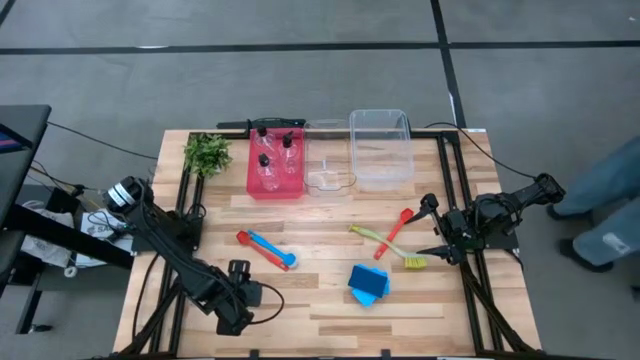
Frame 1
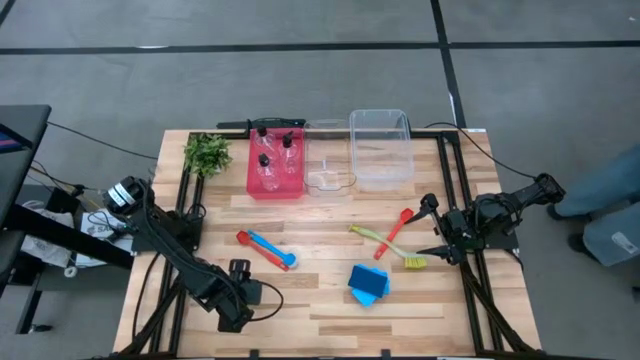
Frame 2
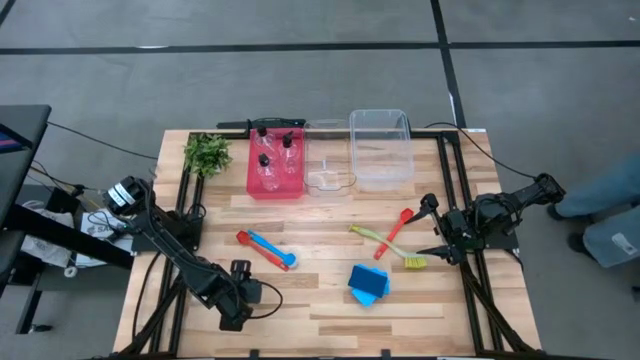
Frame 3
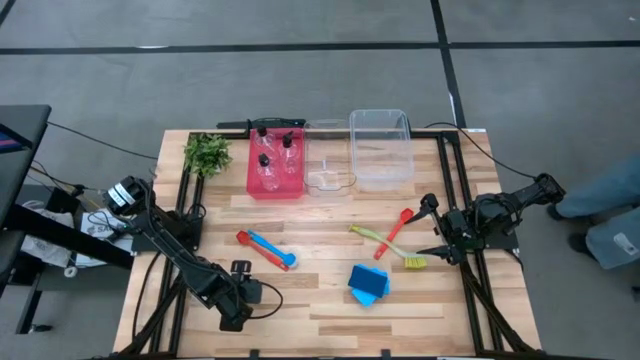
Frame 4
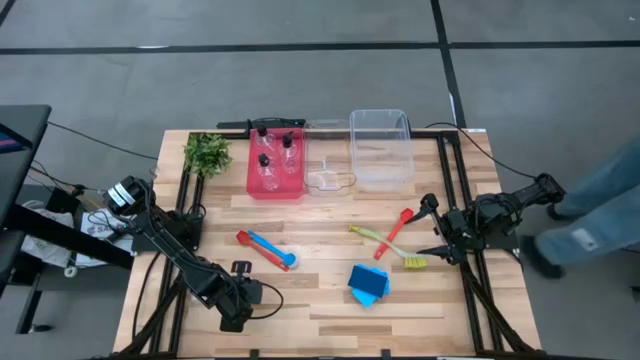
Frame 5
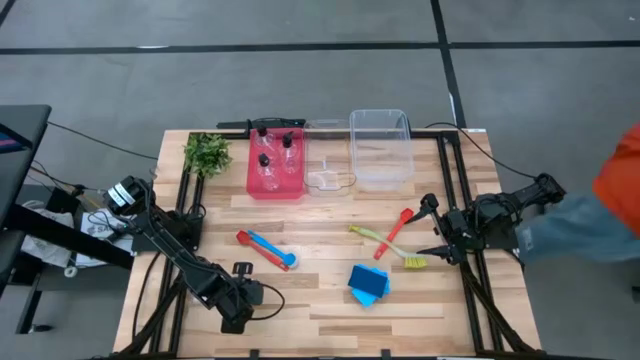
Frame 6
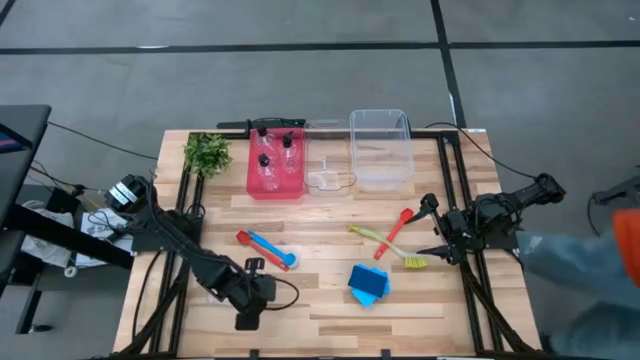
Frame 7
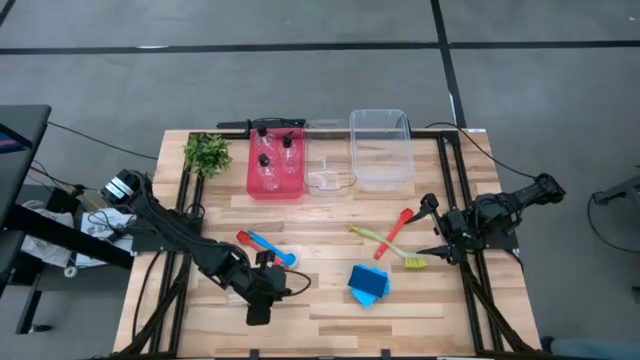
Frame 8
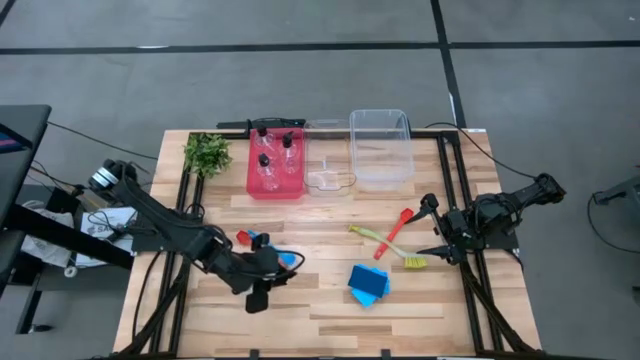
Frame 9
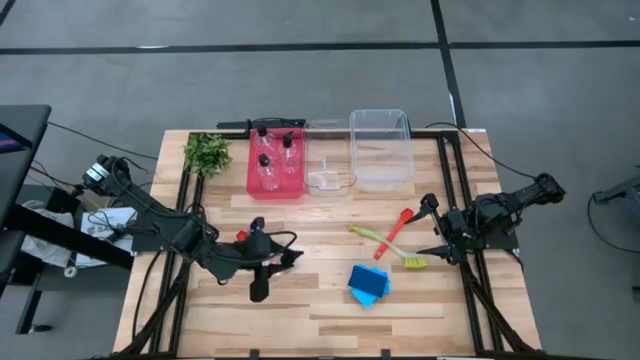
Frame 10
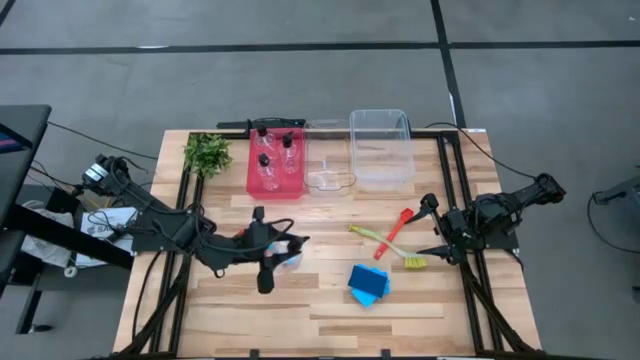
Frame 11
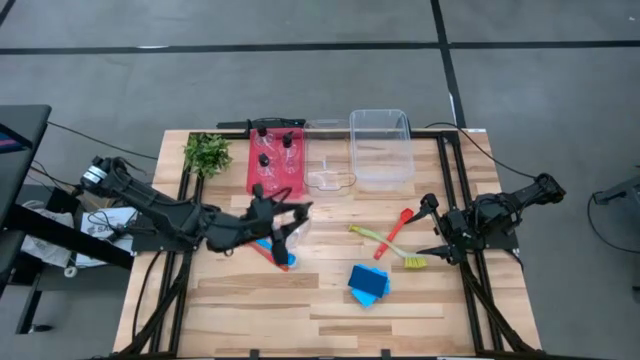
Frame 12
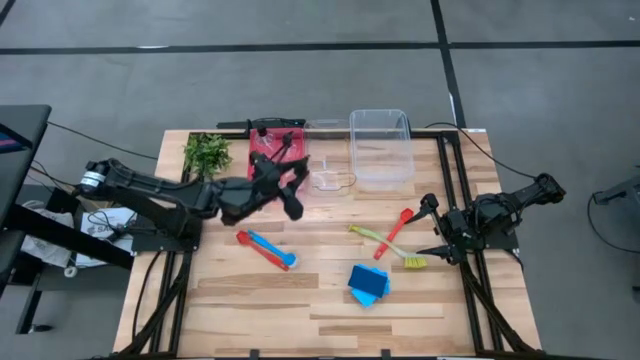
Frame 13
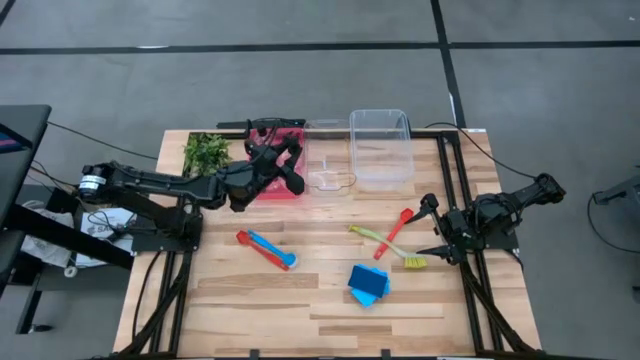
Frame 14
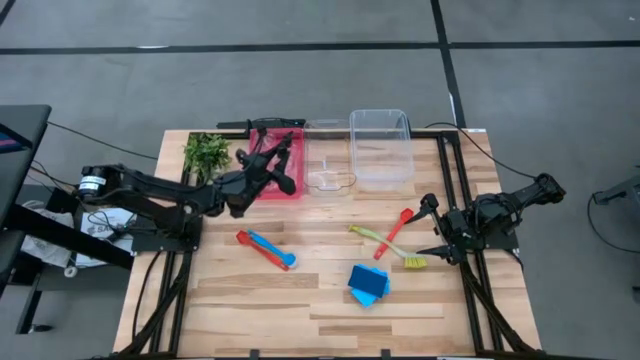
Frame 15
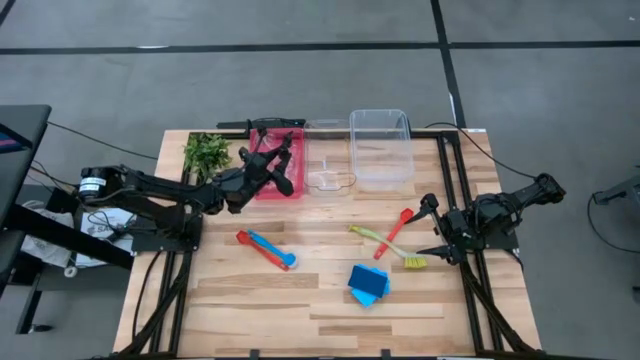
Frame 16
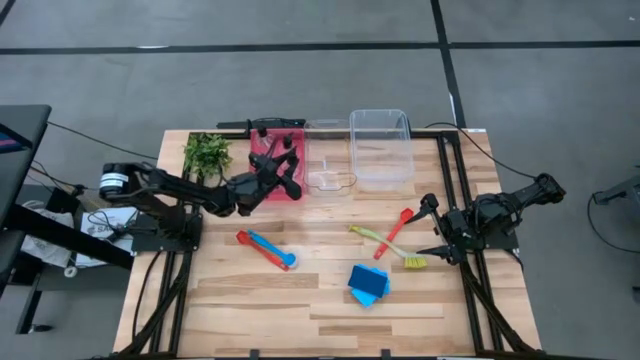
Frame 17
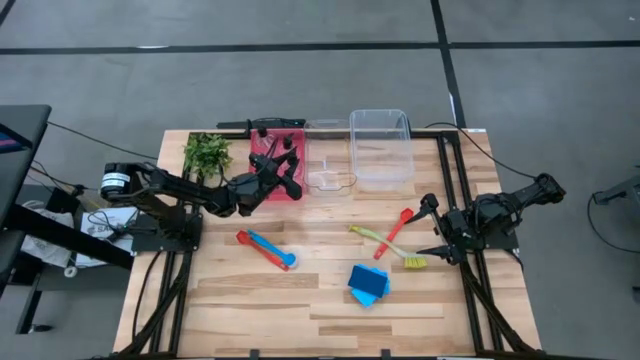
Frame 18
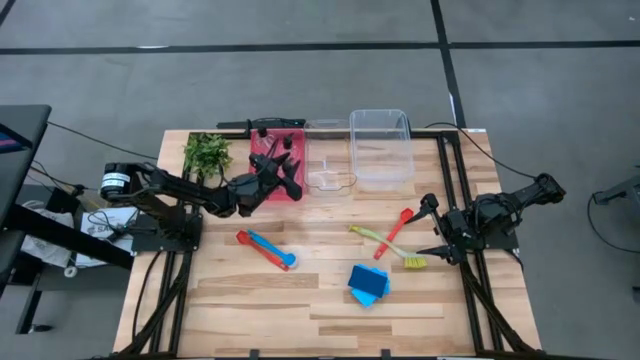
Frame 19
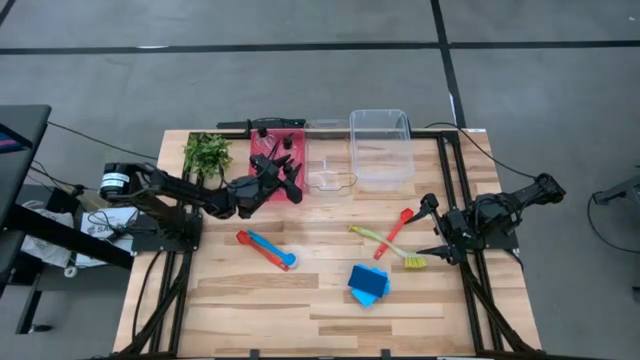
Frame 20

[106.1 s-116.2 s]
Task: Pick & Place Kitchen Sink Supplies
Put the spray bottle into the pink bin

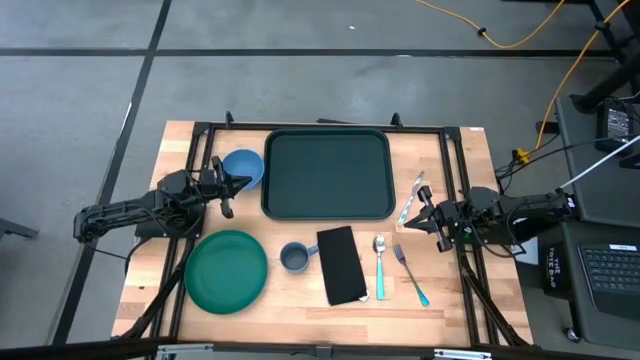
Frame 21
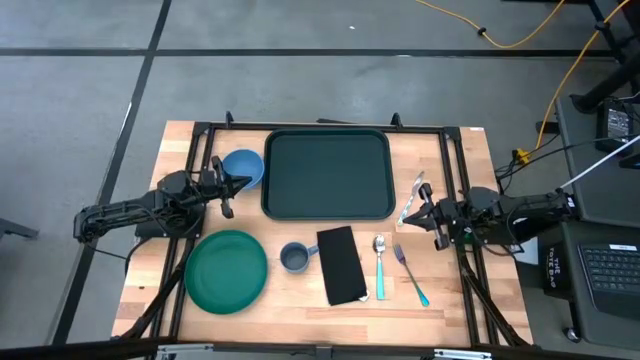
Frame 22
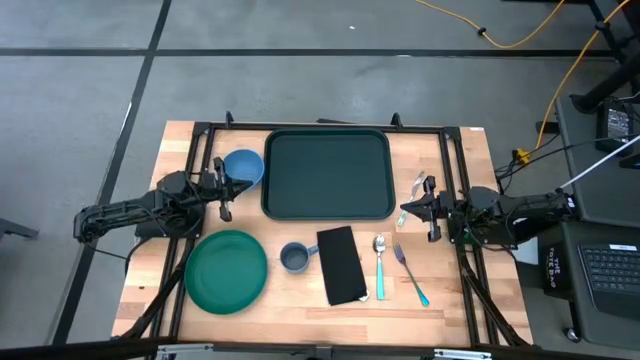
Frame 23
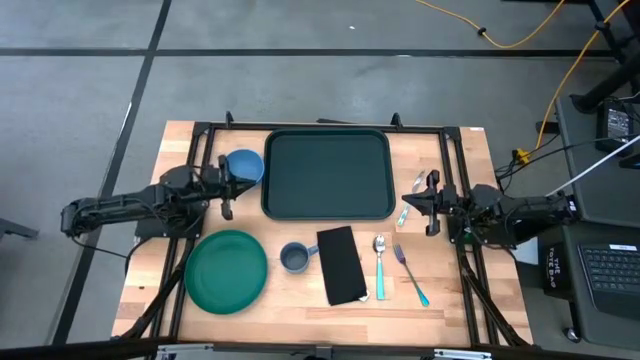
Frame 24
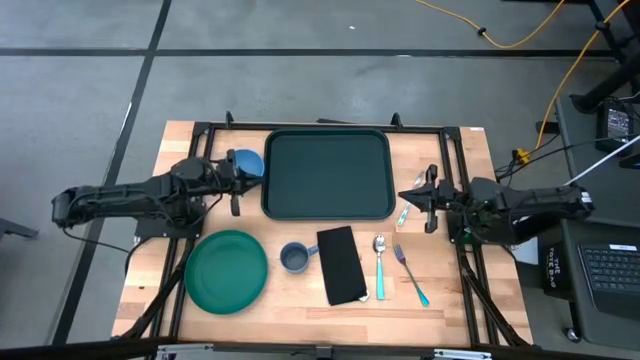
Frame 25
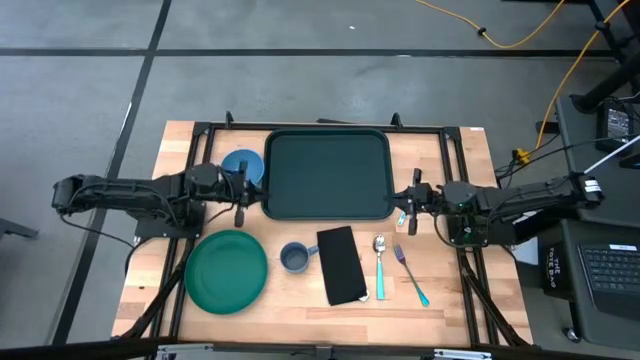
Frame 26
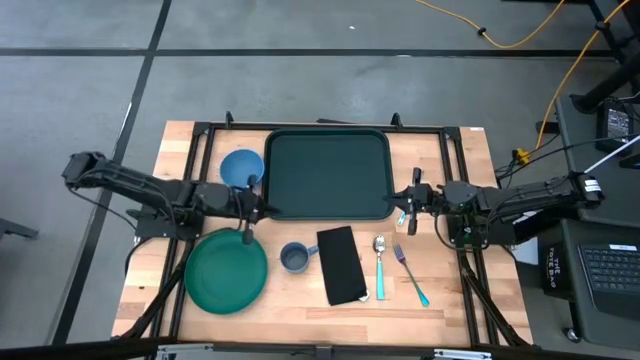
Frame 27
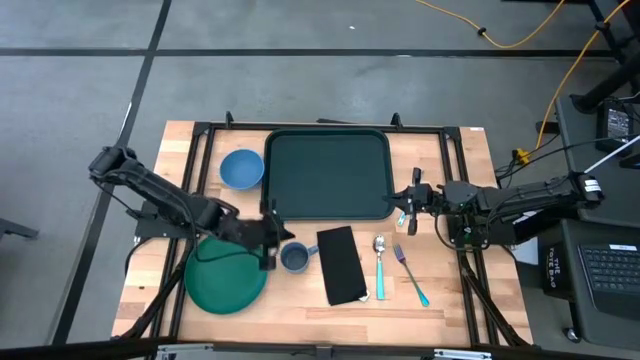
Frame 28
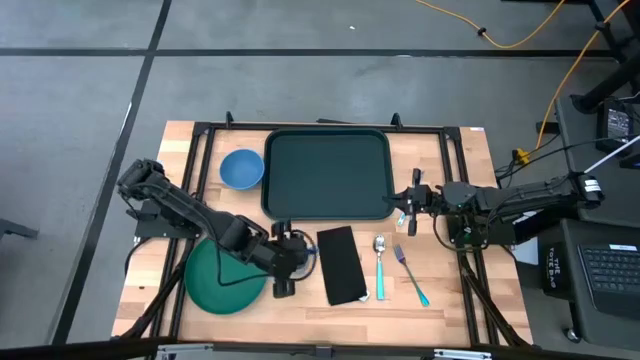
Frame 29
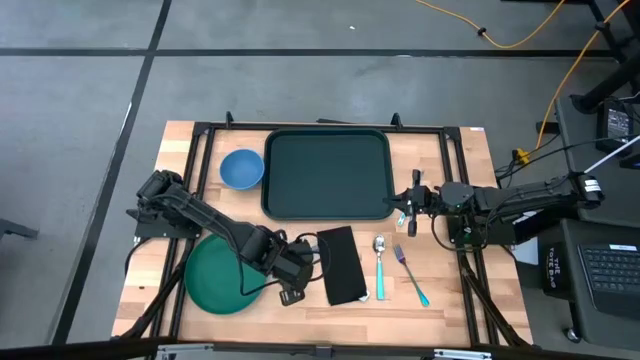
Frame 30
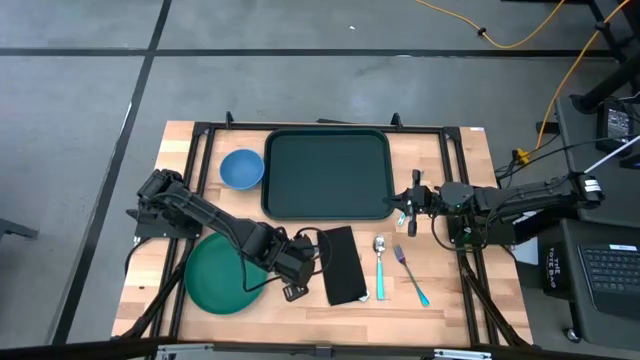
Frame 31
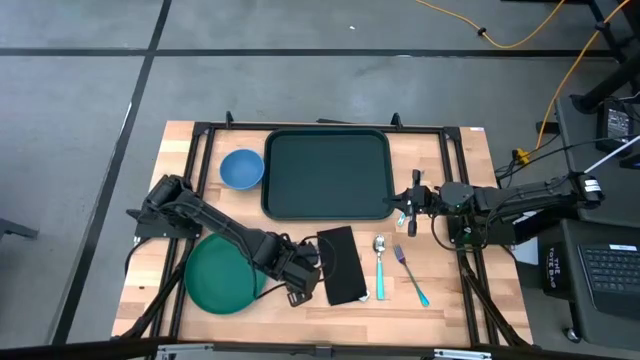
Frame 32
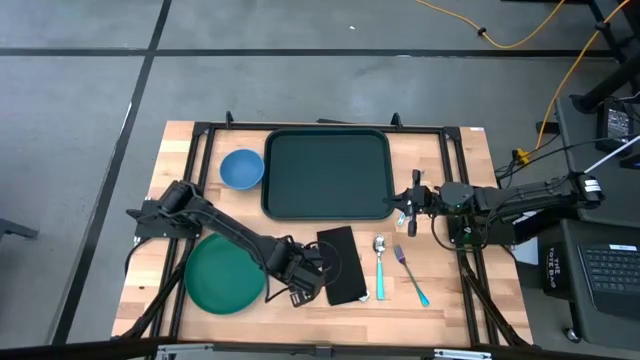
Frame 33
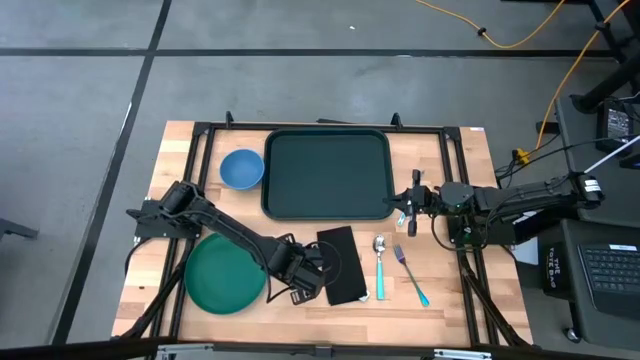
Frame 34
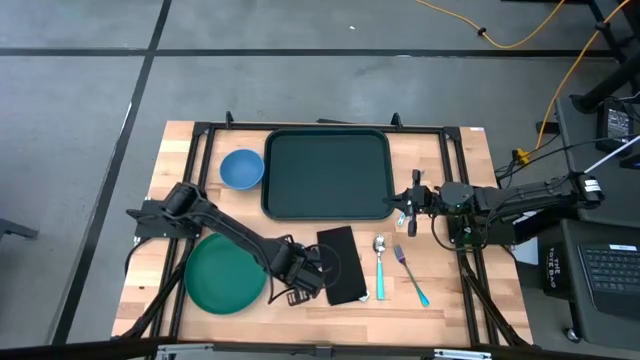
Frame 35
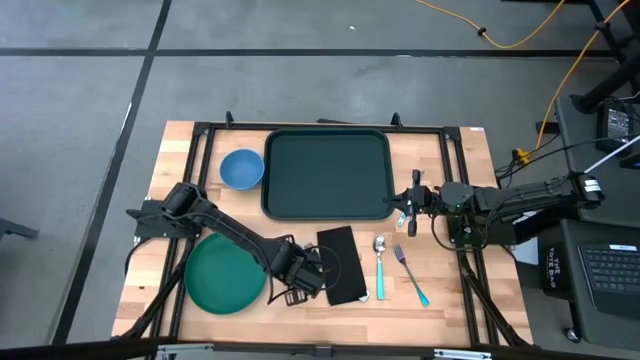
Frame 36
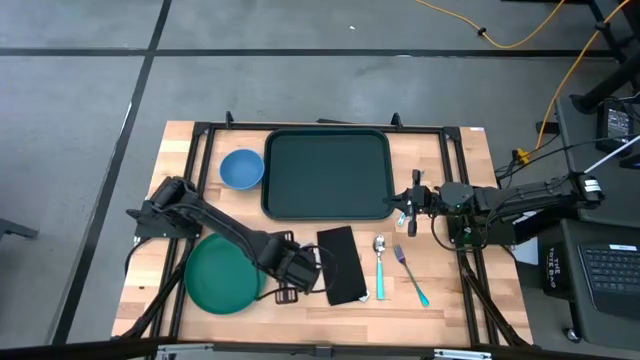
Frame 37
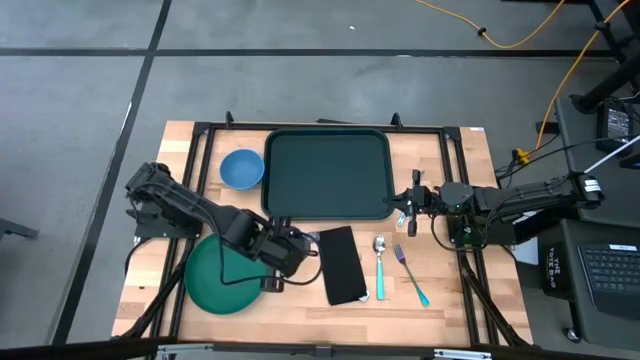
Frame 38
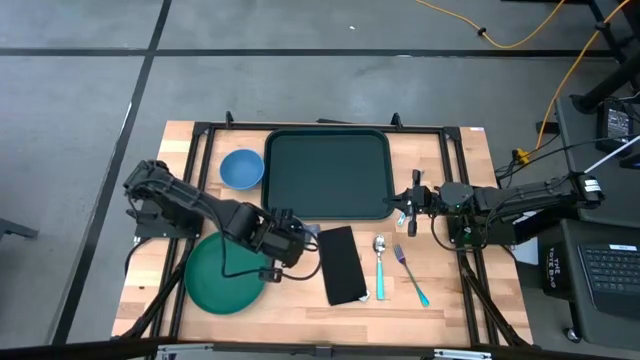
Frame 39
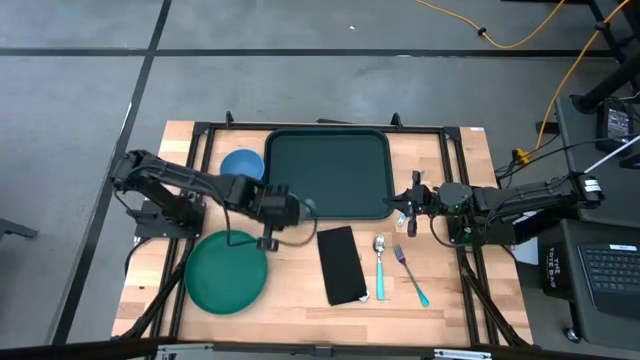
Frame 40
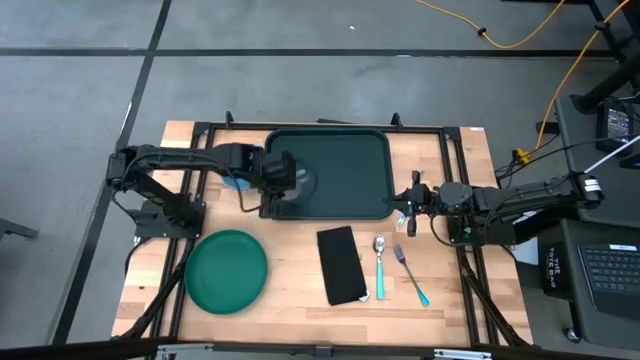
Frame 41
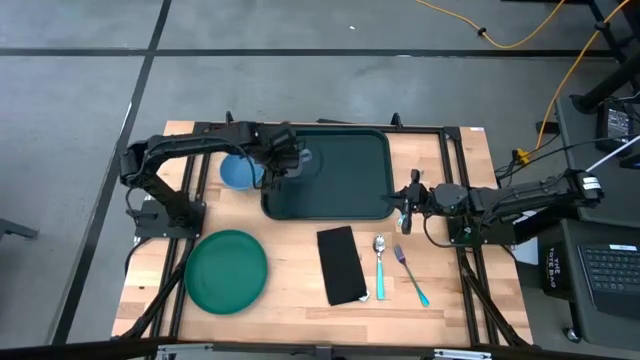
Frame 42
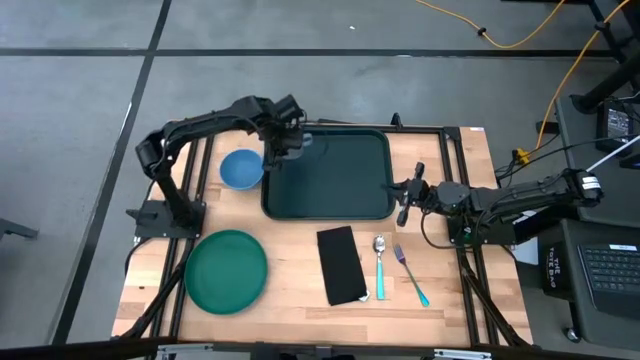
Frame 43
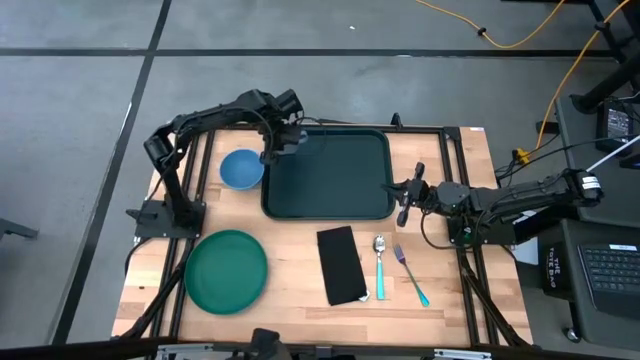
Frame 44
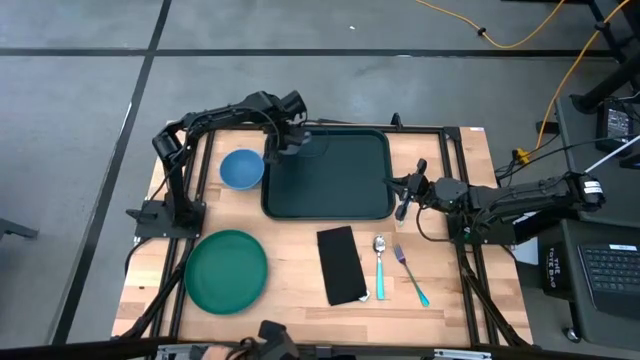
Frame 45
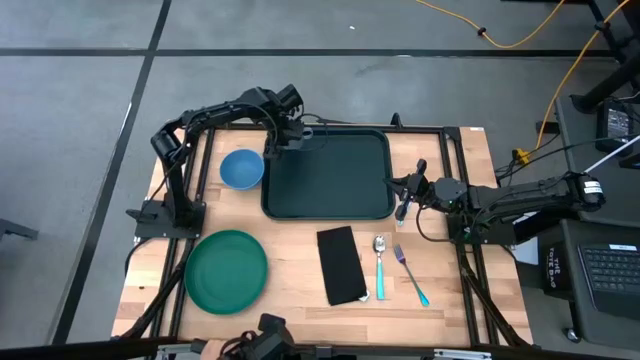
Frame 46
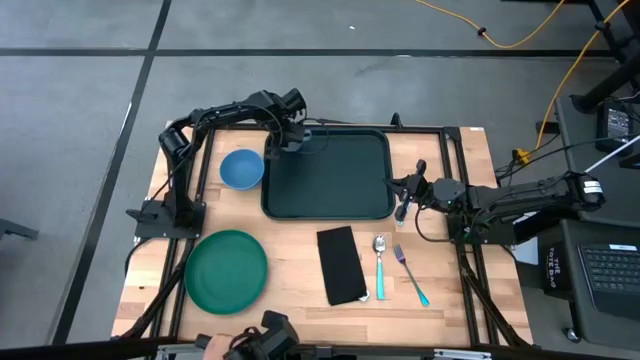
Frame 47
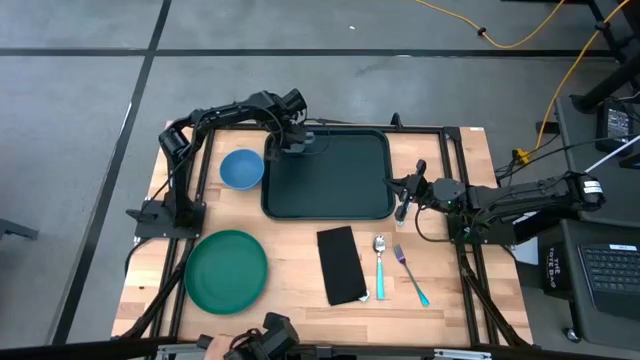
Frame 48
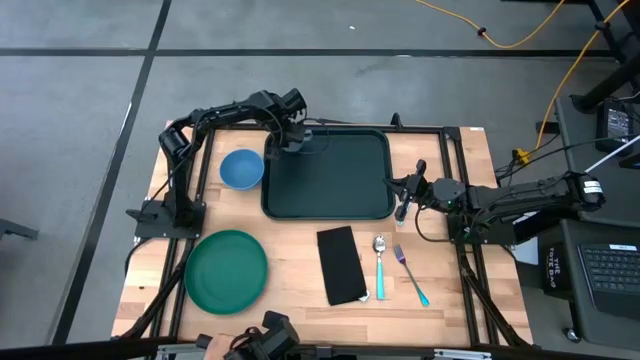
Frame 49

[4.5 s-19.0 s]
Task: Set up tray
Put the blue mug on the green serving tray
